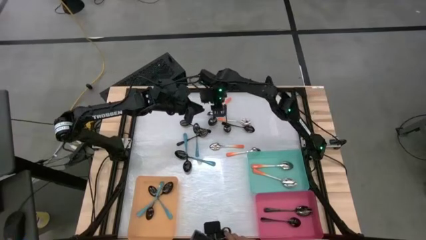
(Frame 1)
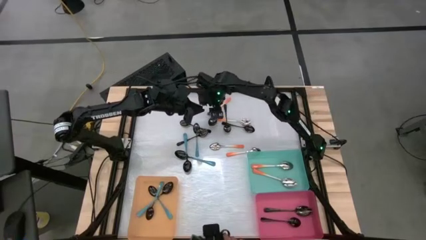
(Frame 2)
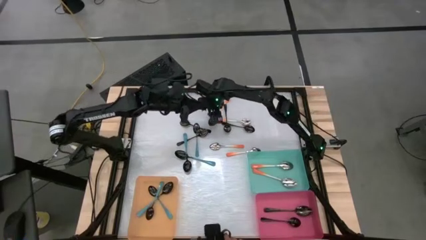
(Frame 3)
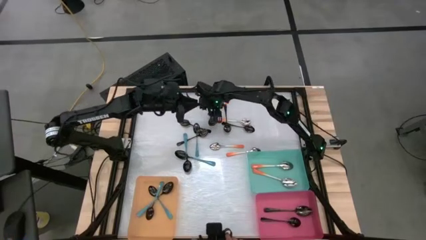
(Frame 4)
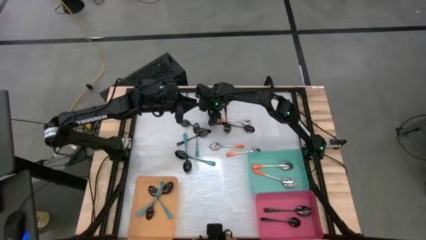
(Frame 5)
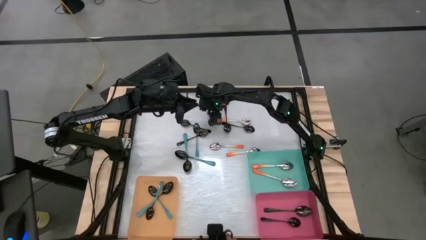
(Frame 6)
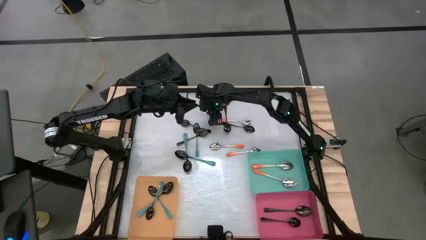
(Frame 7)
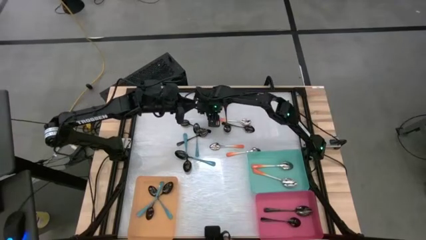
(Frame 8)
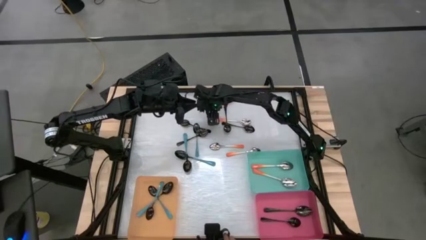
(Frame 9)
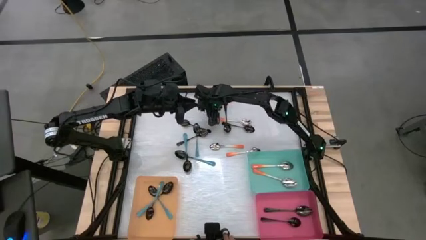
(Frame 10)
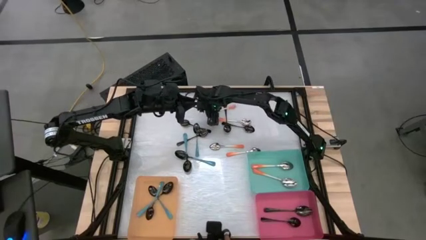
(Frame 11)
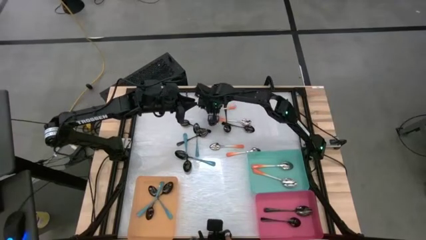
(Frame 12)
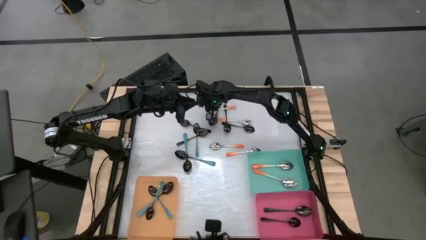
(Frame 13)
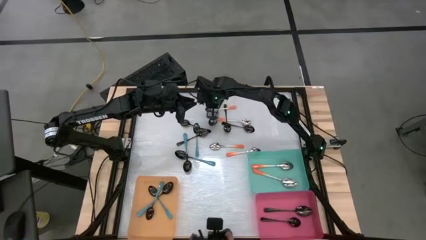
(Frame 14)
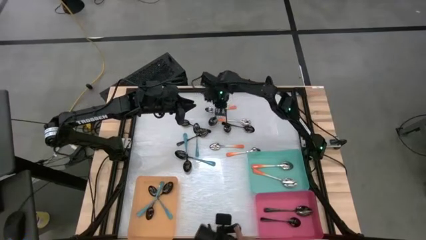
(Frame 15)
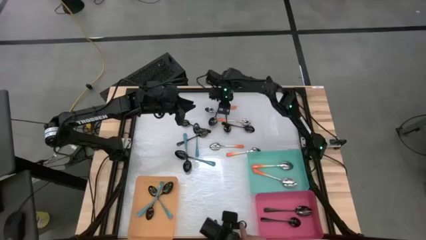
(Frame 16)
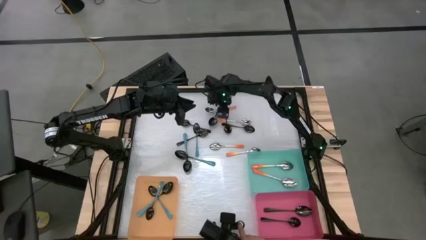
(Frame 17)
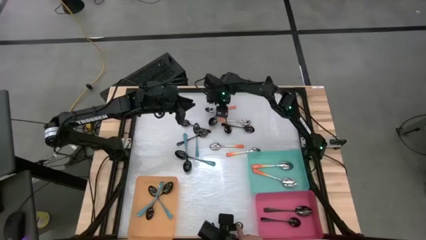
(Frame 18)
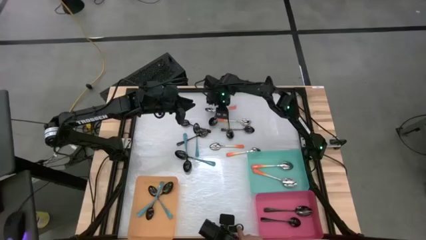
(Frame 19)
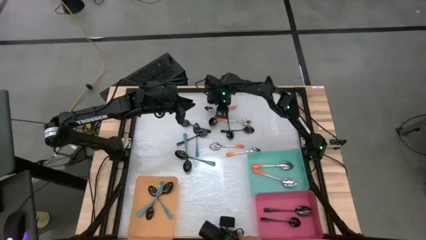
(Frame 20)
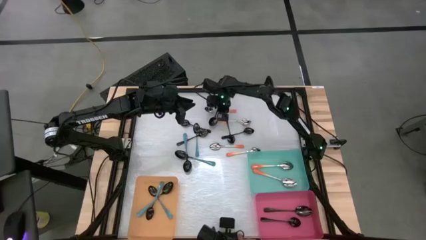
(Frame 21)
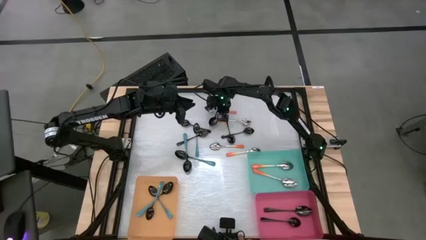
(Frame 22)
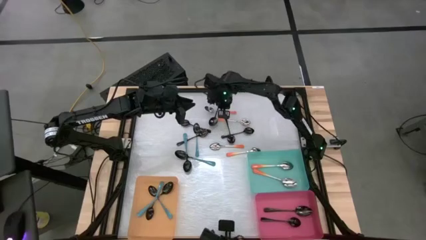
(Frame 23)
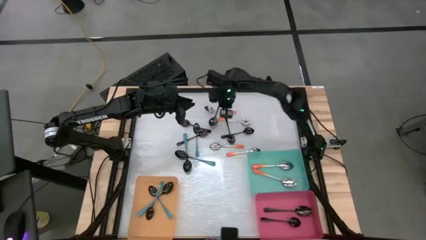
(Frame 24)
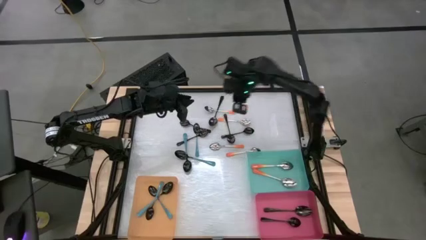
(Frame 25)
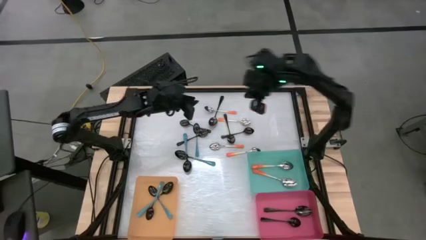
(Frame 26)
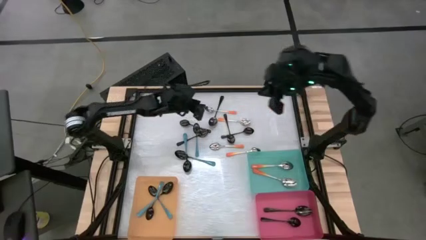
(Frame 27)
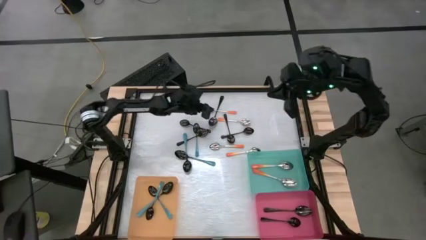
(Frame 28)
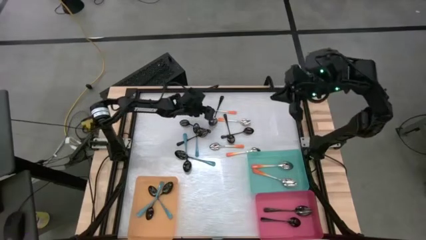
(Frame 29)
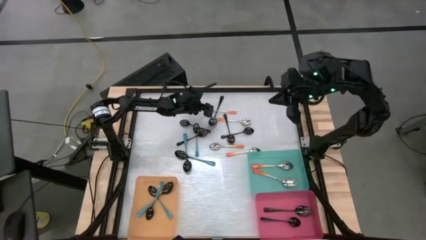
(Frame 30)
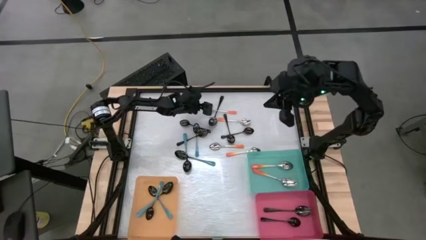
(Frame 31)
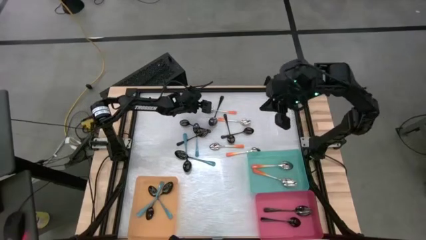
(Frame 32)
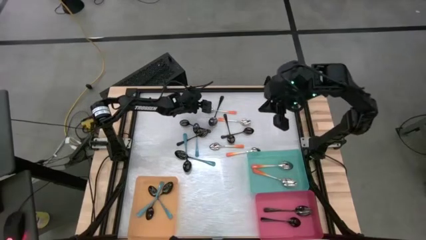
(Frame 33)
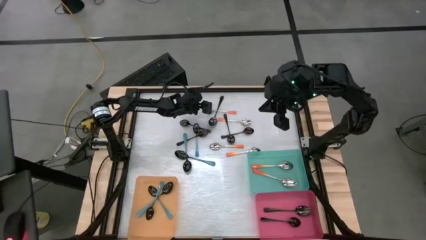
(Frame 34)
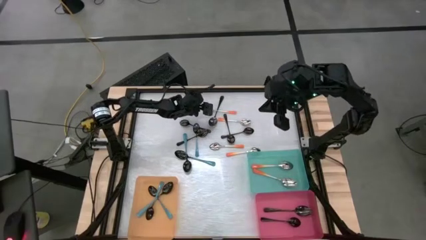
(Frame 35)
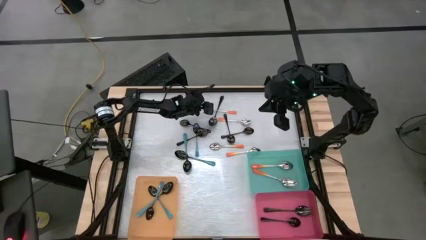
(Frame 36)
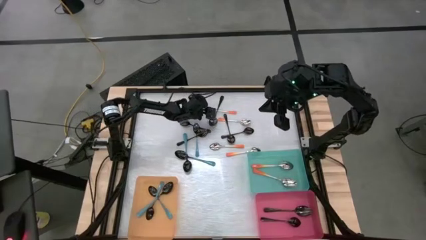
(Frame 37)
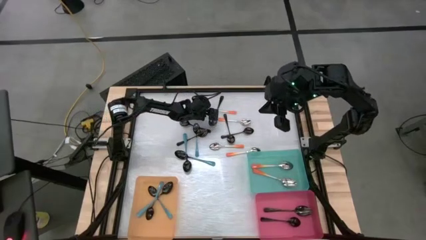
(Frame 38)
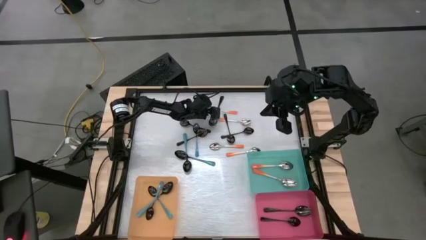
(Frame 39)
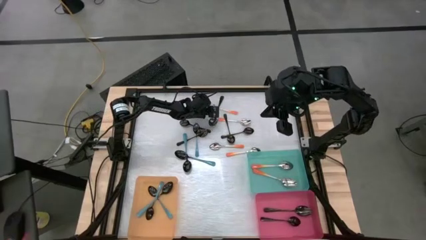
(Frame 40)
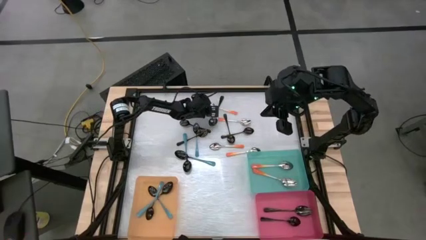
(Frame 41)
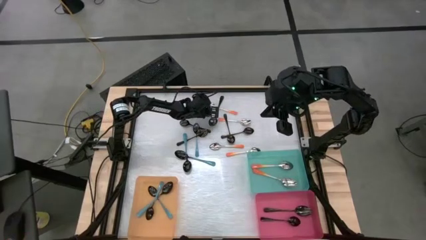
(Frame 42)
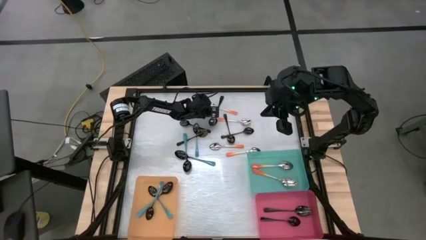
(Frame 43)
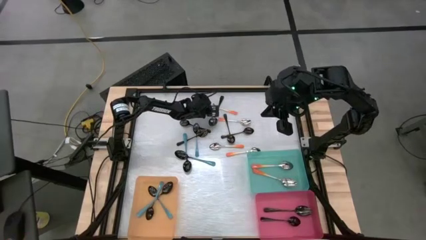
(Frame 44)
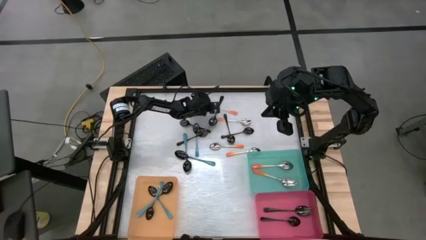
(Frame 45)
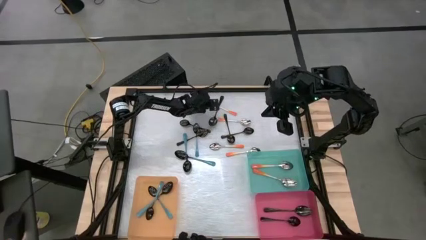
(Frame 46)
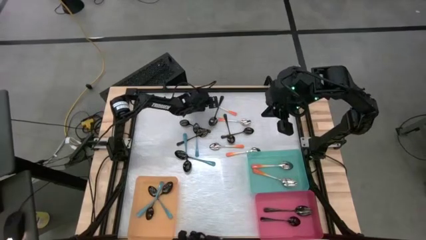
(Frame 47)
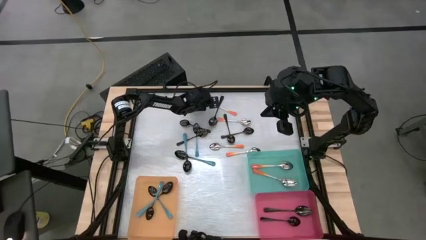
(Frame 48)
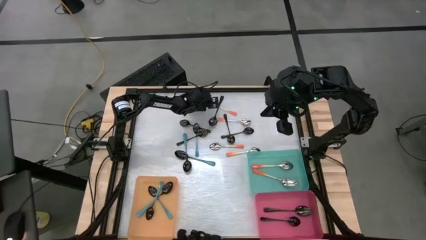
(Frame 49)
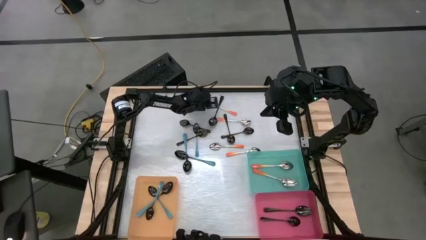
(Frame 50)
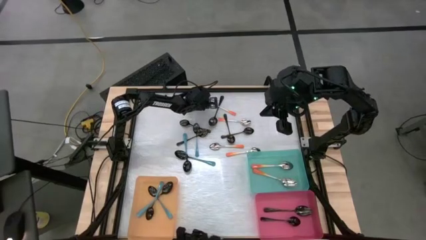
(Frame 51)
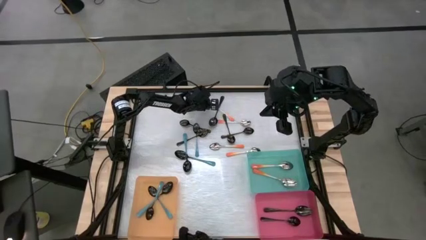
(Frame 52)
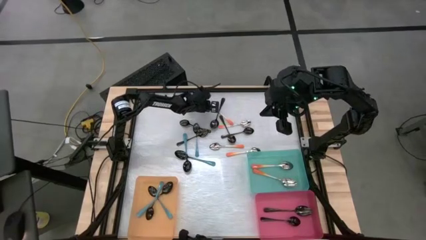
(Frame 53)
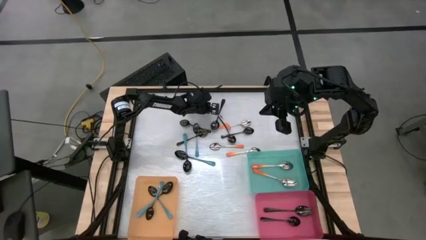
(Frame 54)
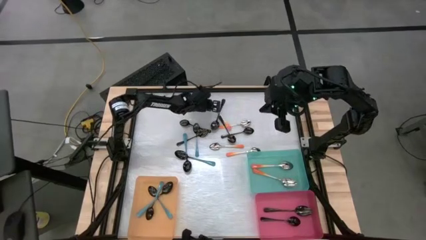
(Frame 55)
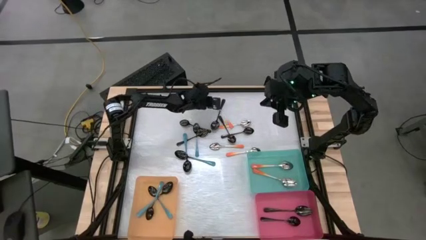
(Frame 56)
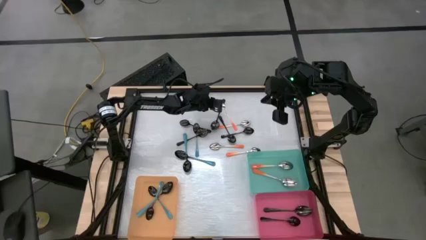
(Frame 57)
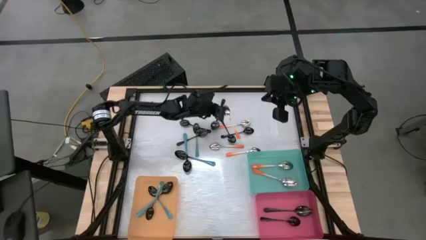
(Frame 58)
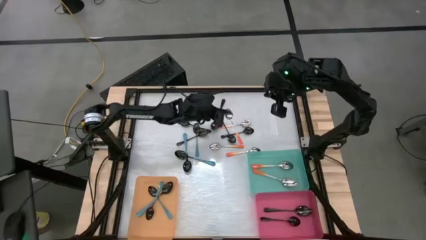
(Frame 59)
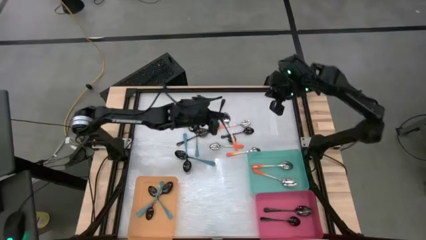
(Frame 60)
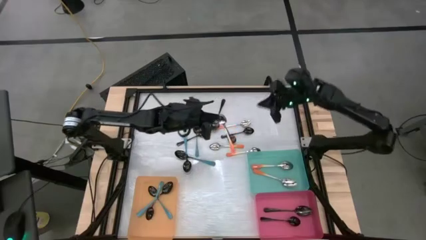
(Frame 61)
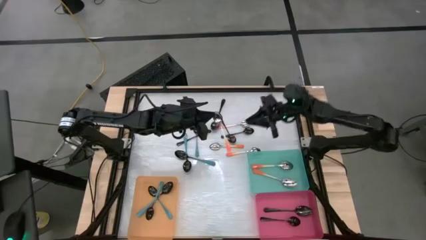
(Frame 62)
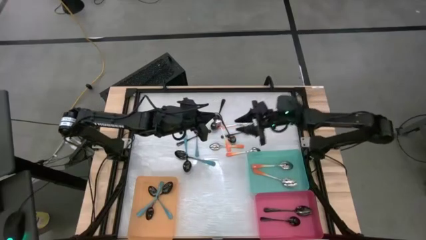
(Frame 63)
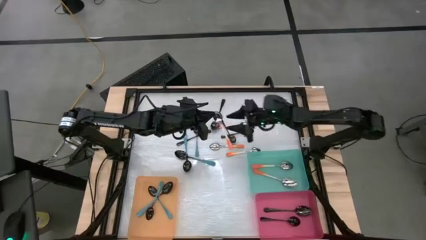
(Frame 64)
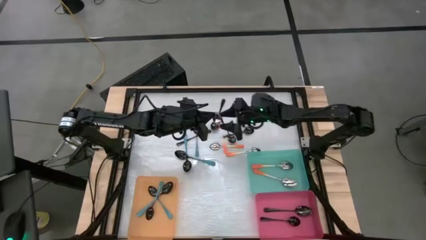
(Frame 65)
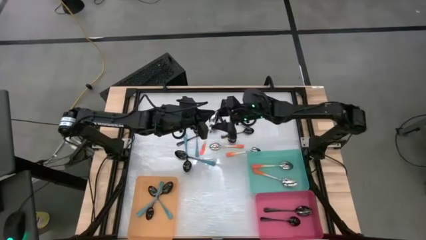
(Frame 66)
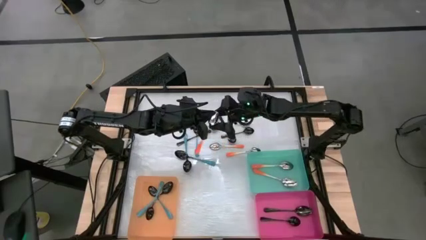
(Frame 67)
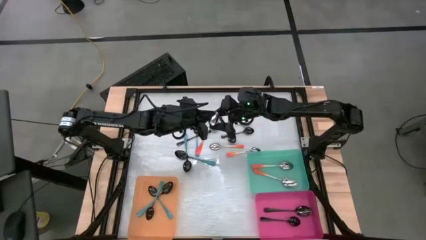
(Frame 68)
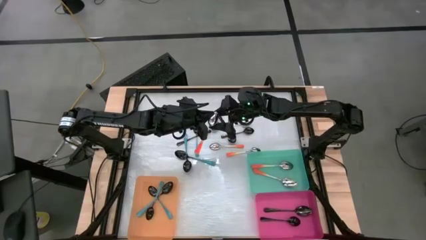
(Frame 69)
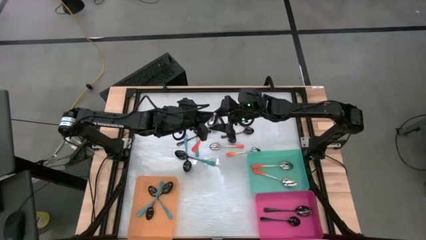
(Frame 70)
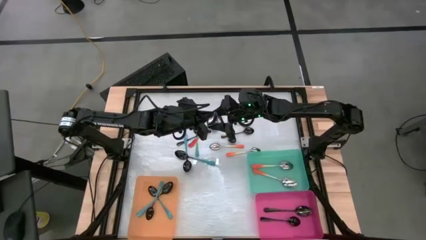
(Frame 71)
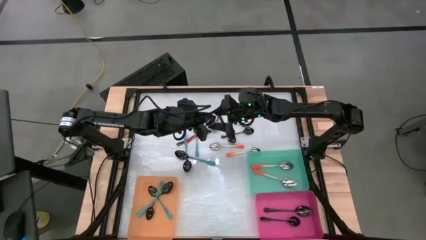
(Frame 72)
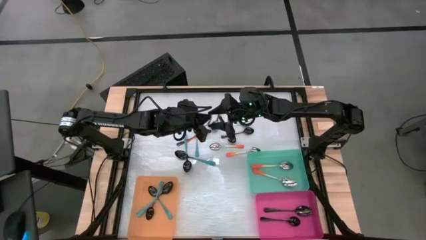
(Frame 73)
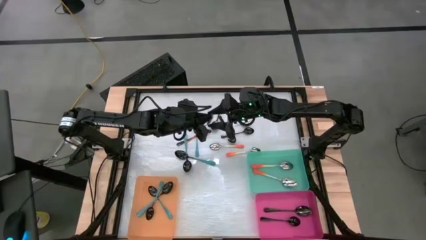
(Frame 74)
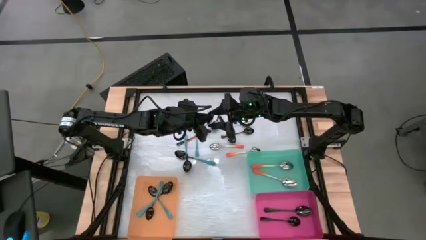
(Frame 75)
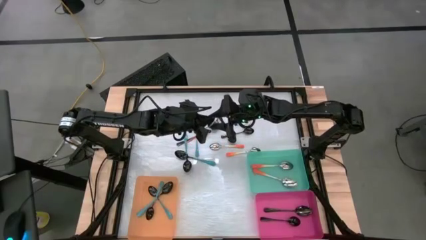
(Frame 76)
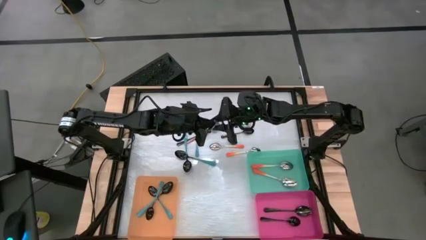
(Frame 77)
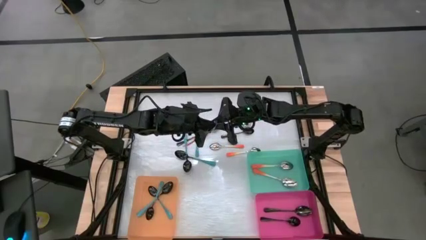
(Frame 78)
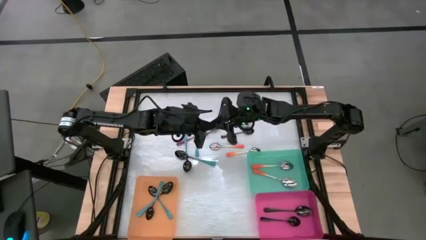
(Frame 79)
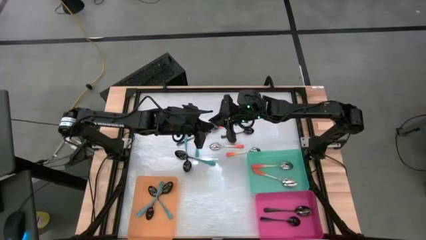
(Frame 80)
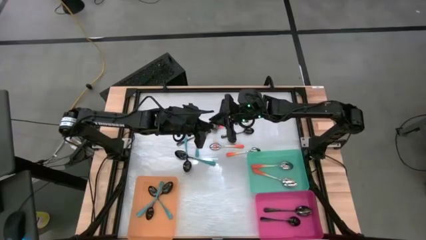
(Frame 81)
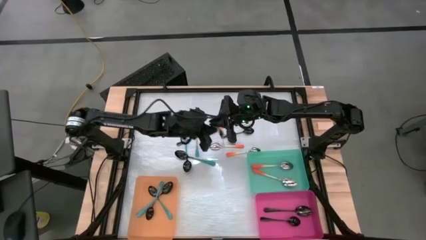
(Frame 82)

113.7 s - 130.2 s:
Task: Sort silverware by color (type)
Put the orange spoon into the blue bin
